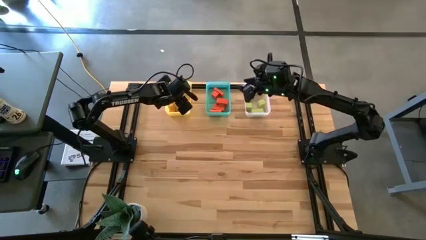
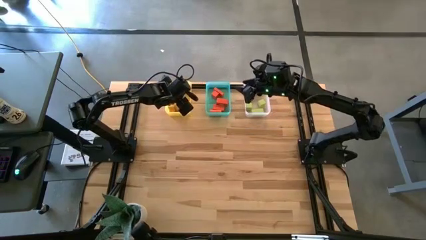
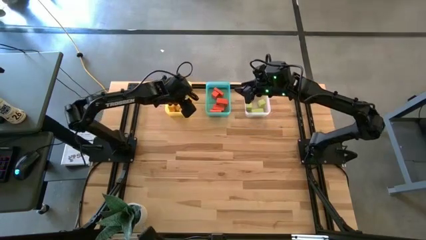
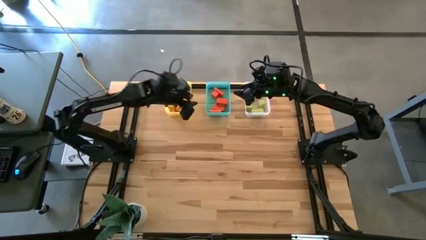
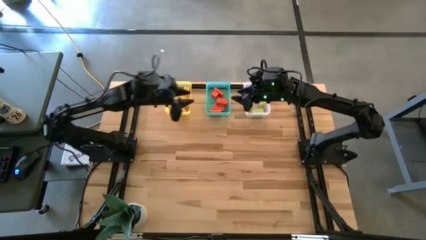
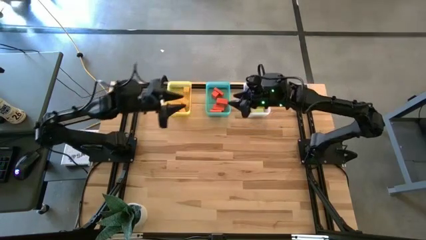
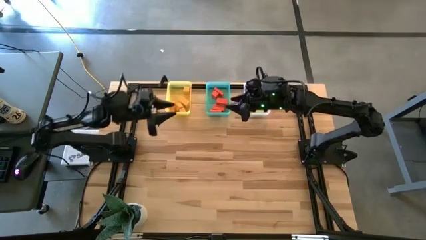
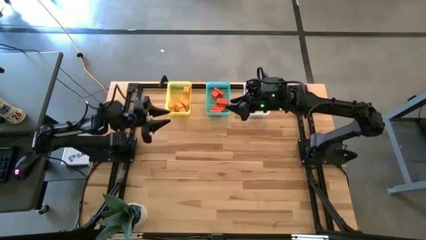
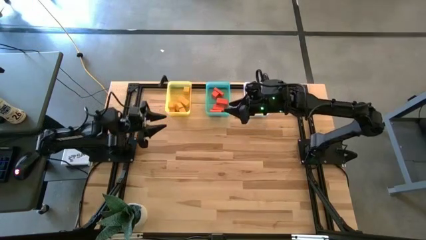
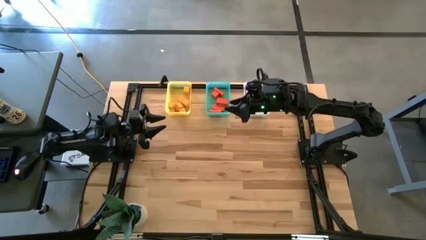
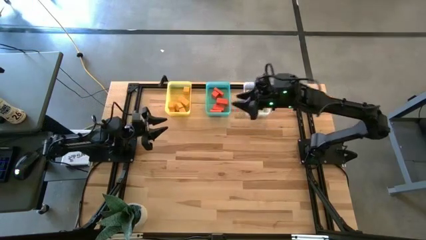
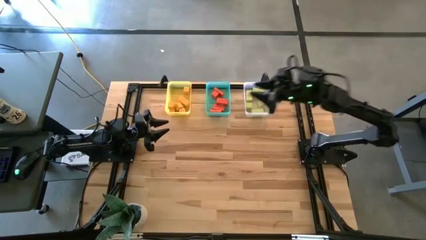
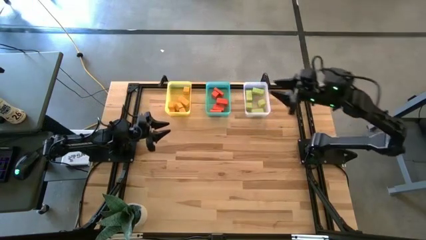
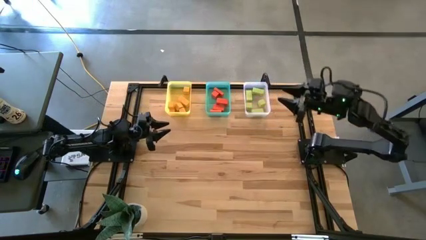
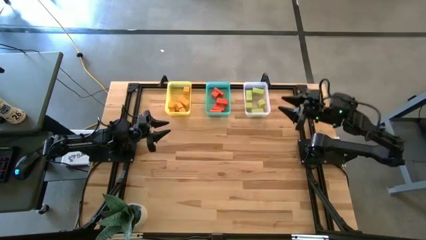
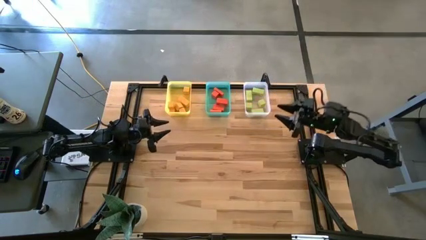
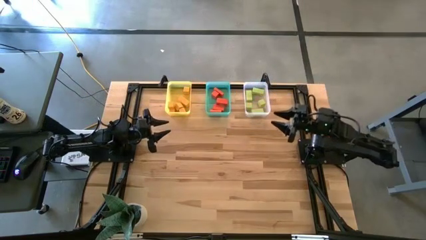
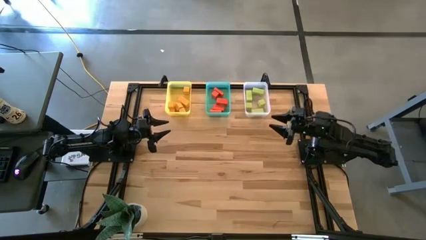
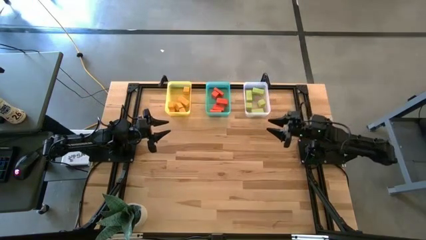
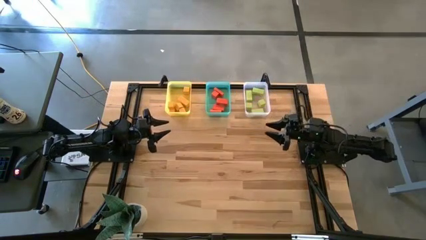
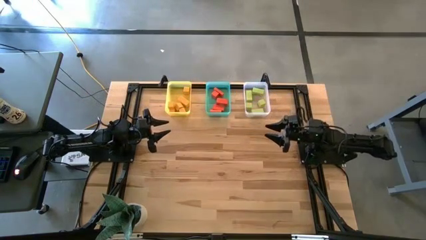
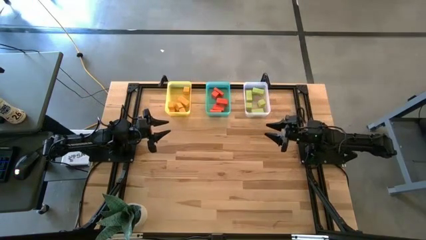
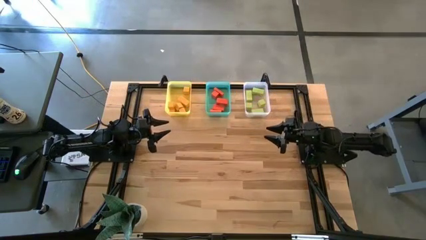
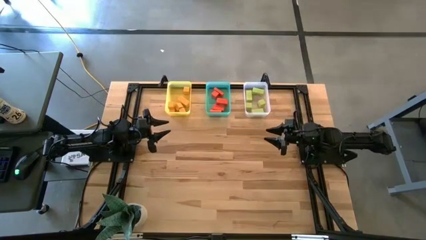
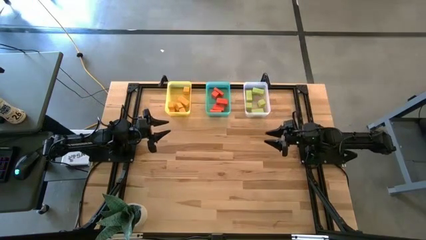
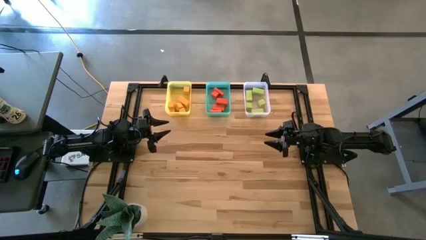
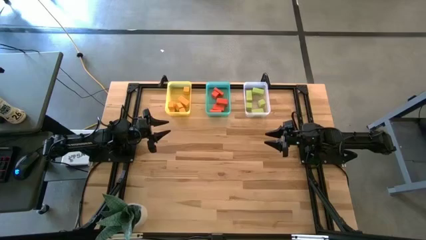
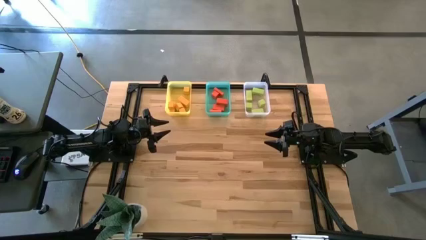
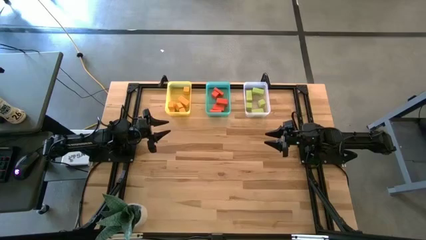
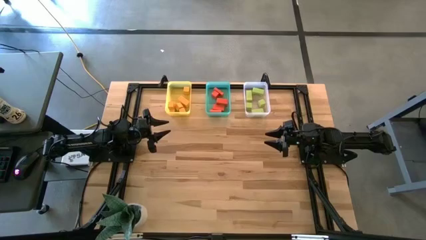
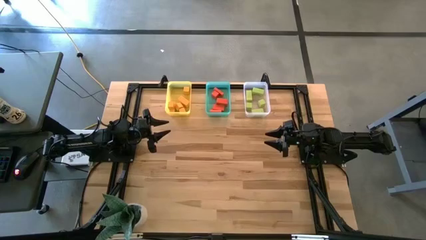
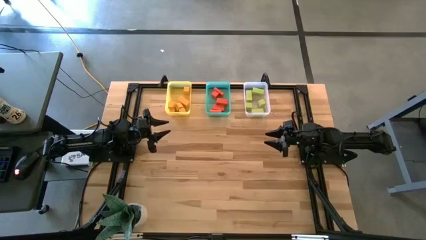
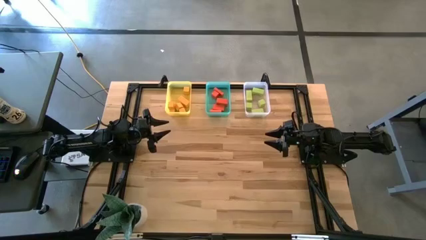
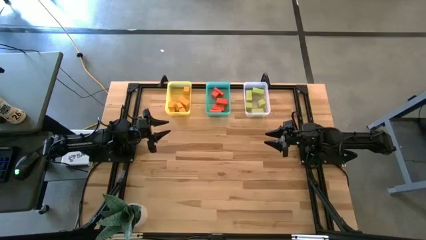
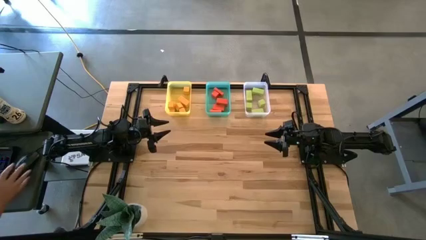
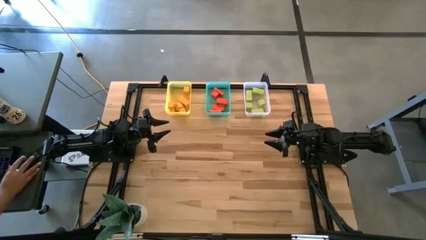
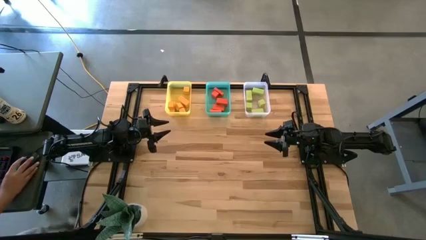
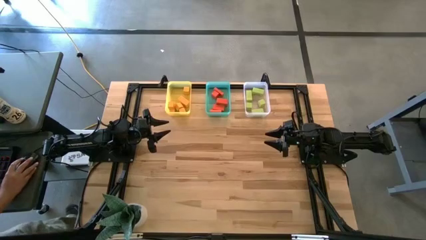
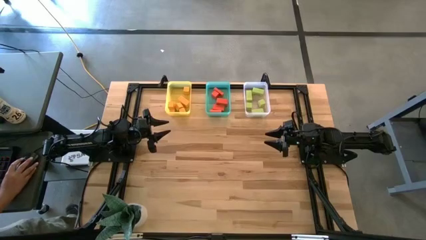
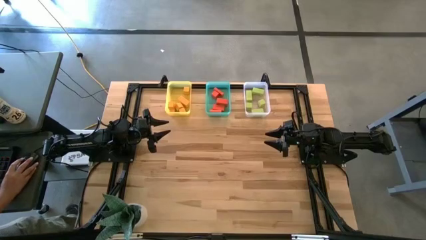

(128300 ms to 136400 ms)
Task: Sort & place blocks by color
Return to Home Position

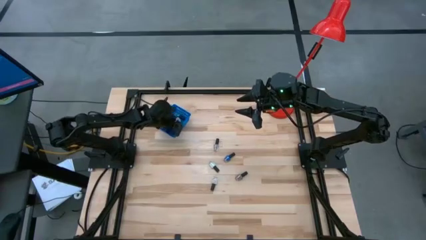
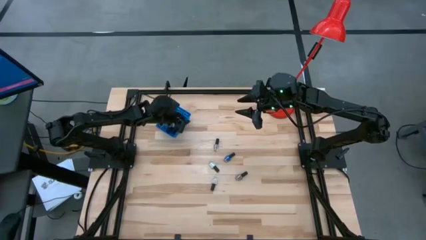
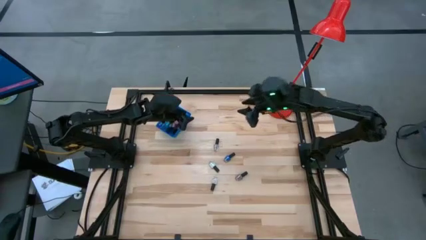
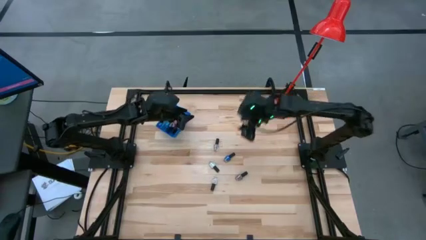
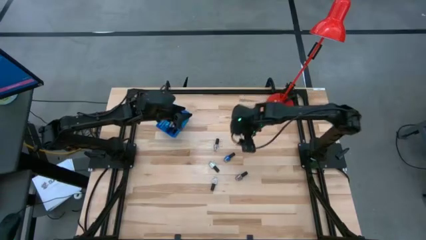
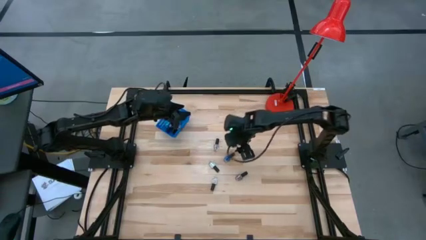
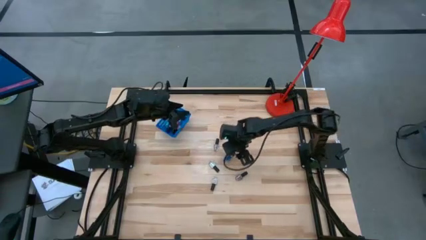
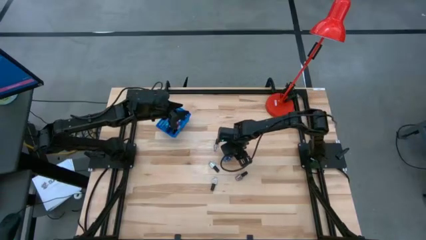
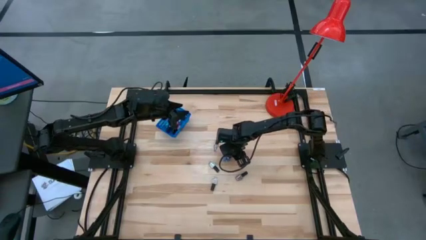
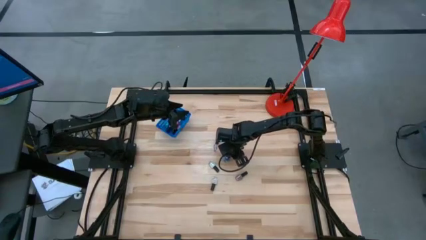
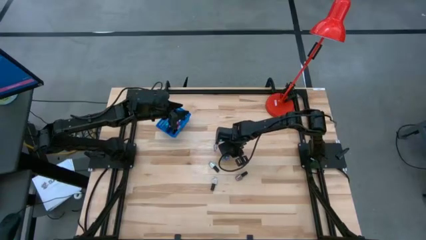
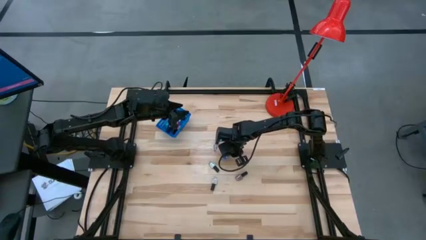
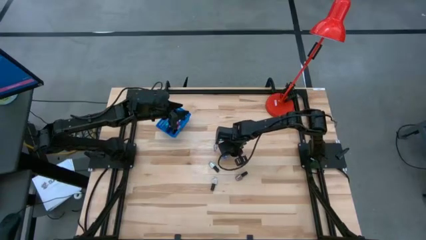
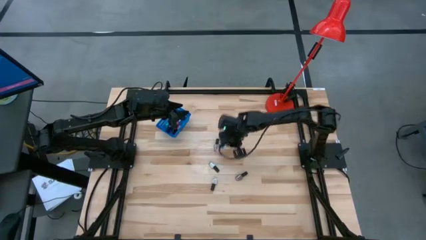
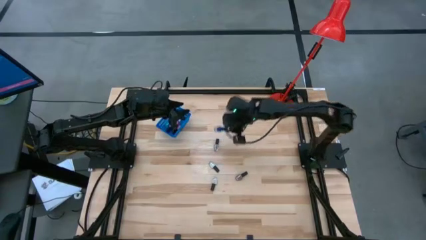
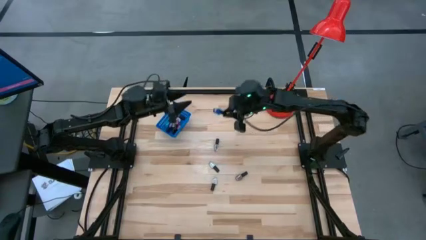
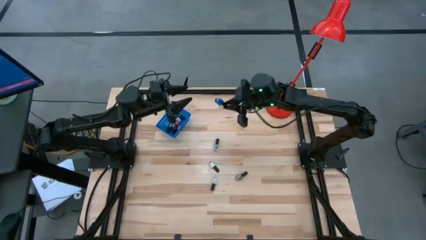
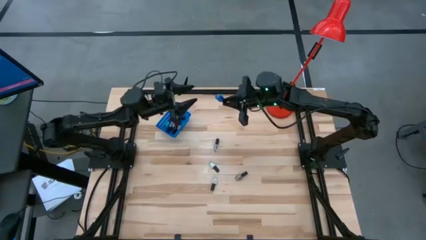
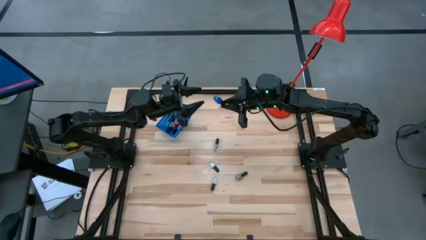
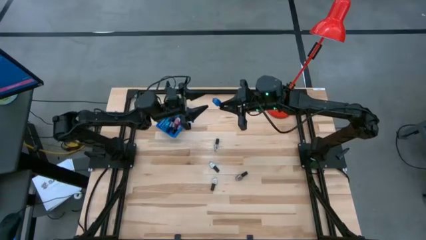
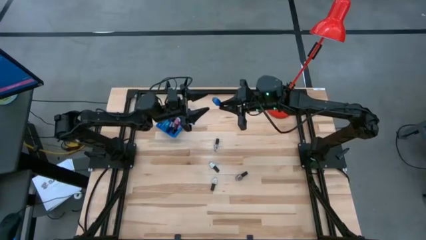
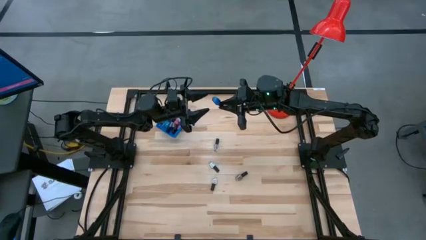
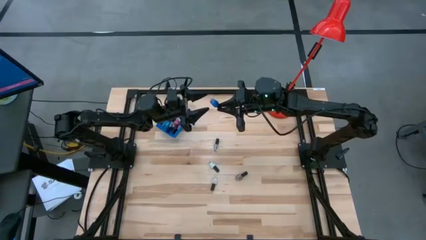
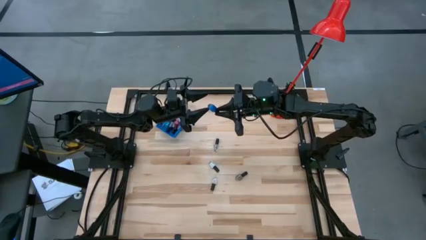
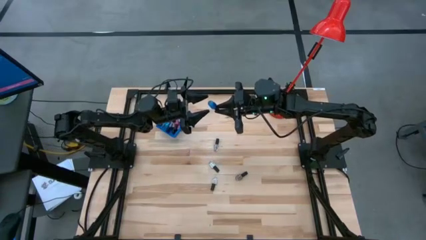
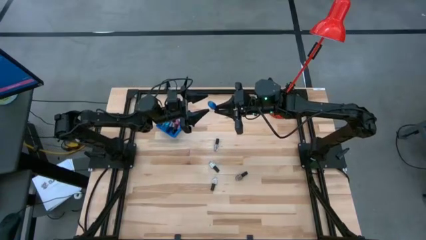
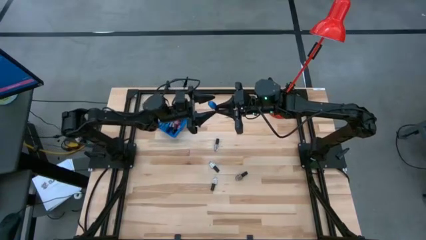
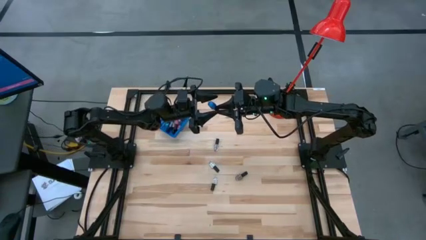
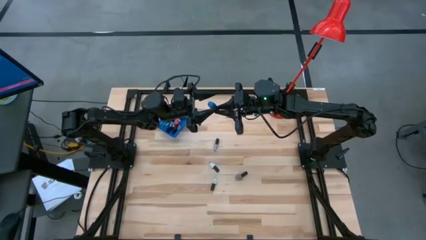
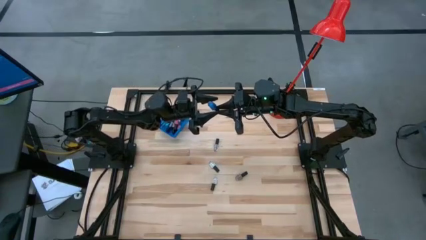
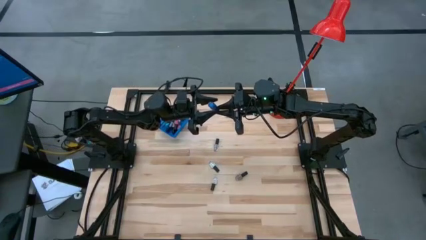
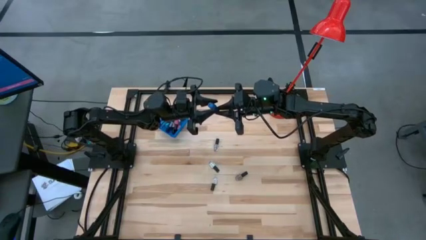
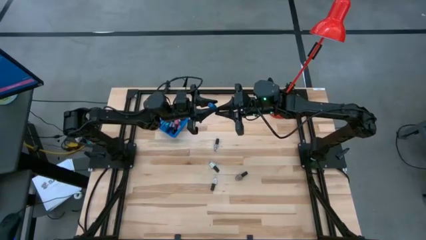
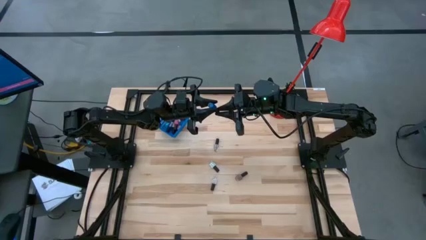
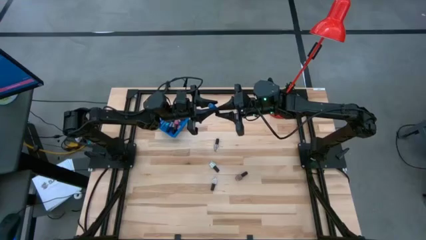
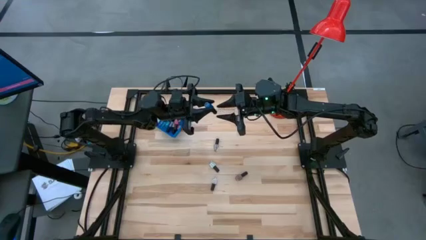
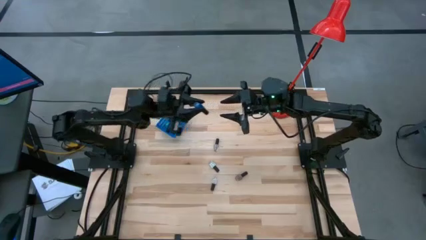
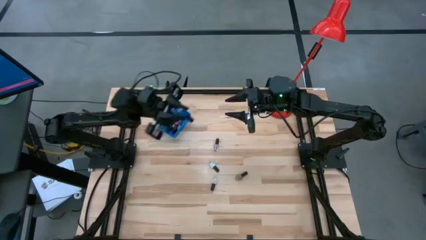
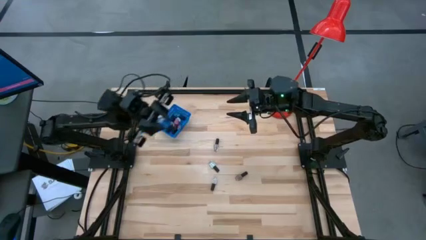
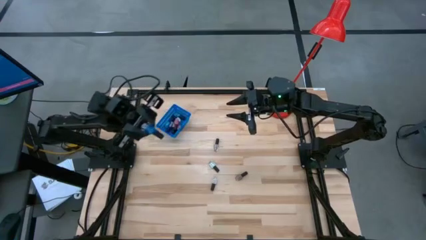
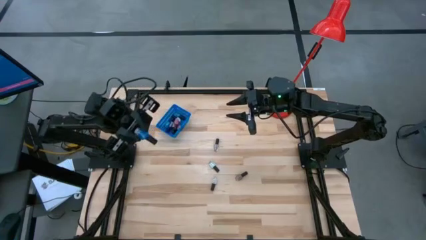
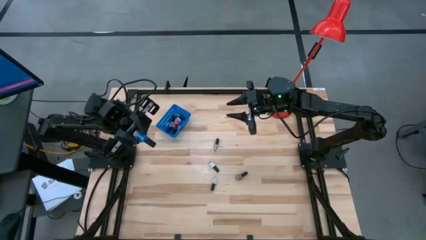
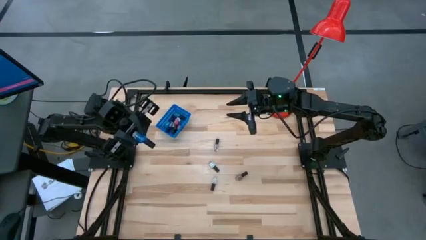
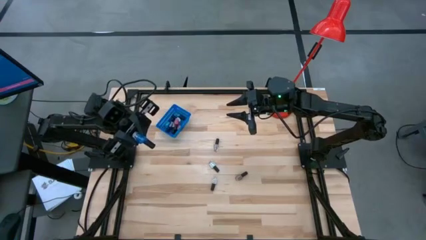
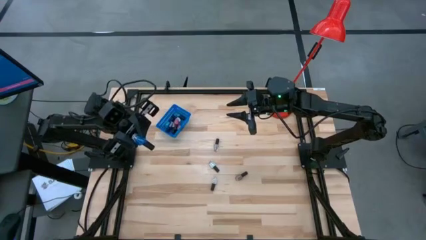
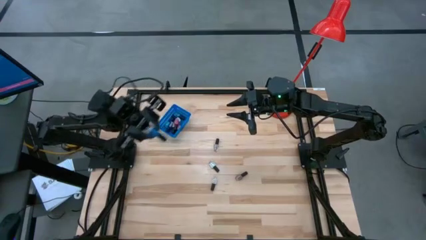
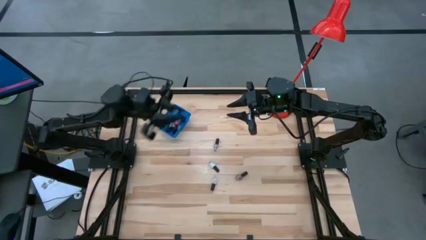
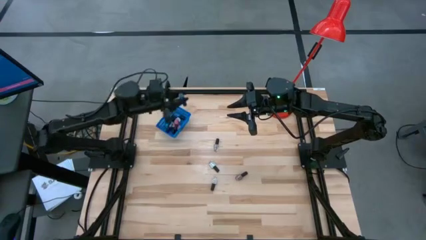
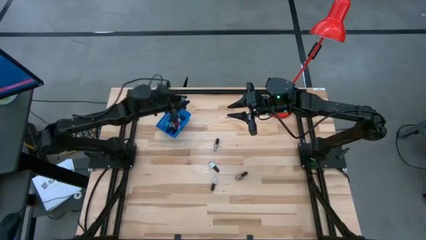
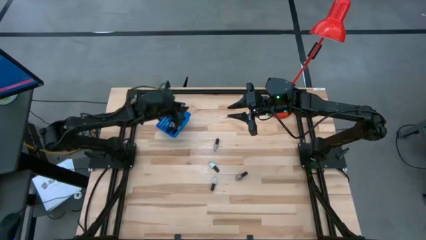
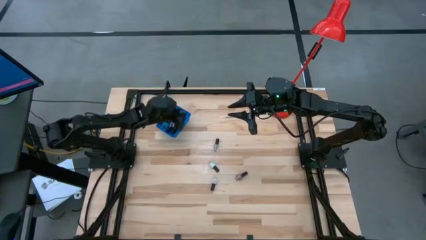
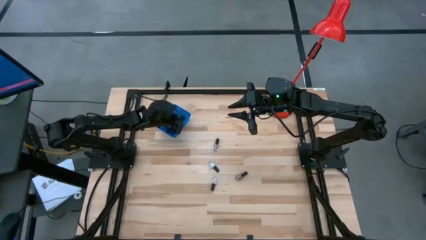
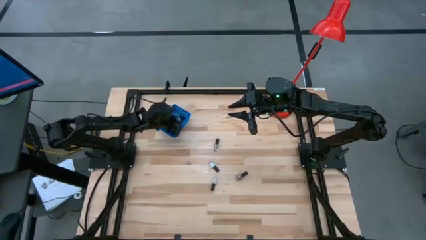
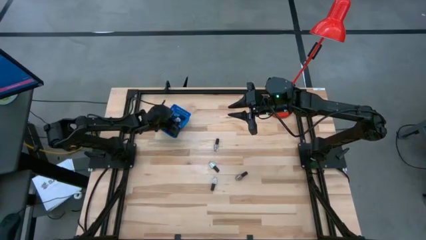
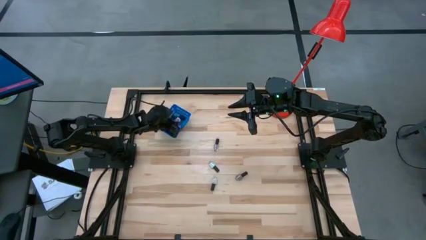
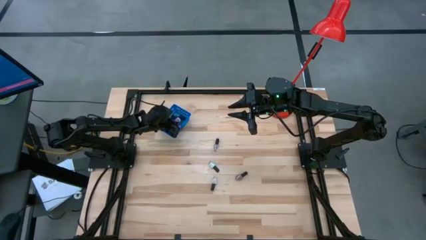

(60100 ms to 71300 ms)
Task: Pick & Place Nail Polish
Put the blue nail polish bottle into the blue bin
